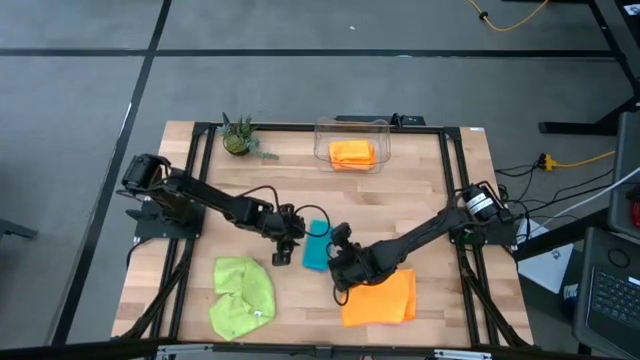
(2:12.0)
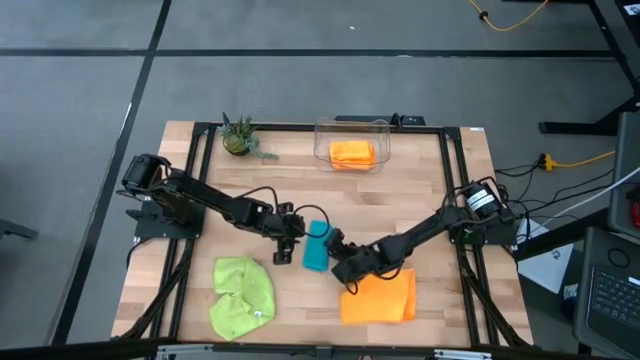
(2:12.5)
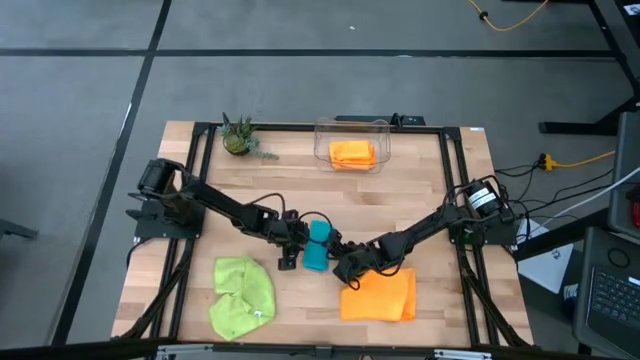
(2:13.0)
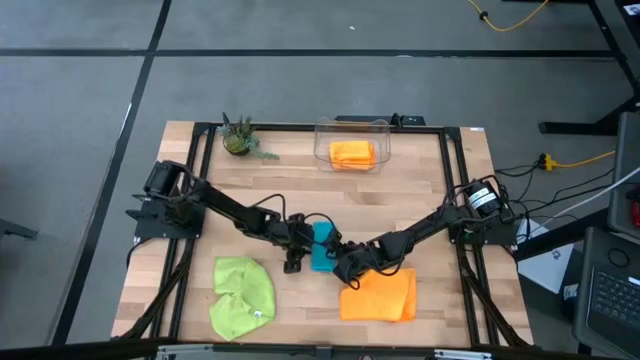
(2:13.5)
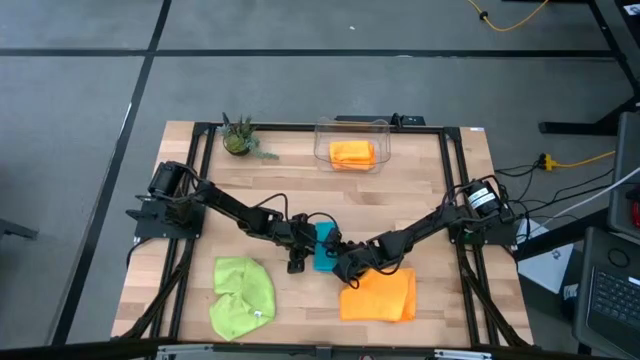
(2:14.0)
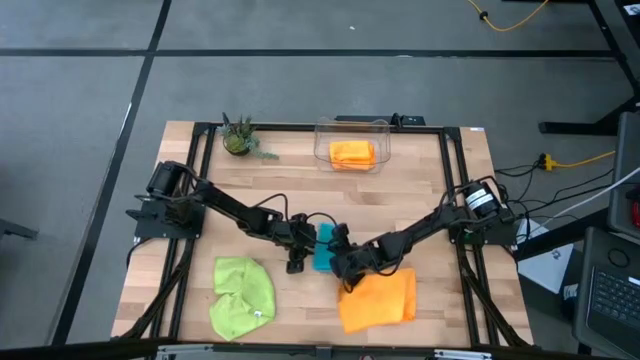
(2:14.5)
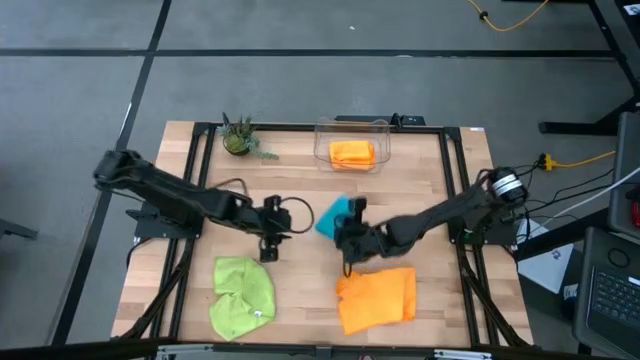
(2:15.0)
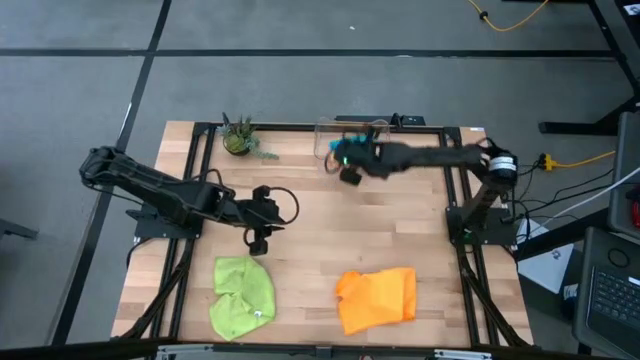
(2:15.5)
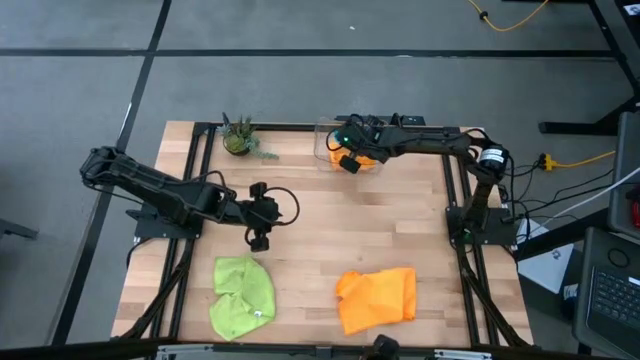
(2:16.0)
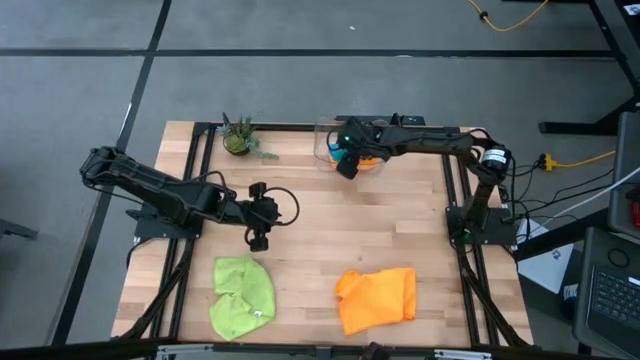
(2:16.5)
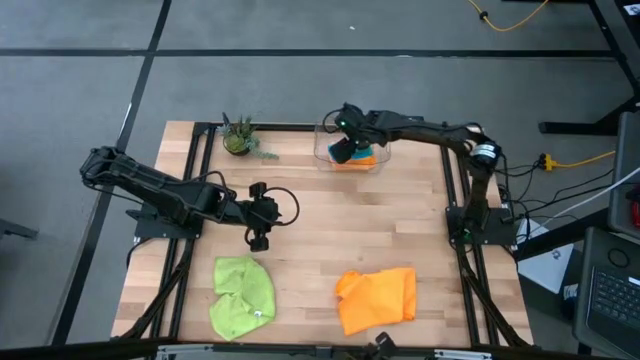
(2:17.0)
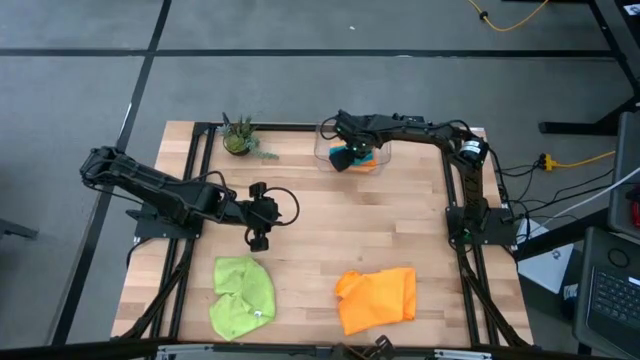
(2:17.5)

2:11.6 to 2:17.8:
Task: Fold microfiber towels
Put the blue towel into the transparent bin

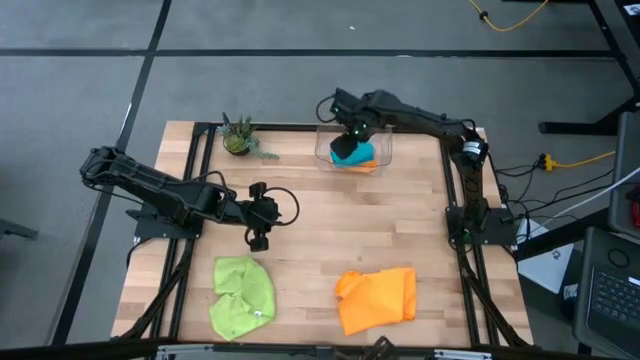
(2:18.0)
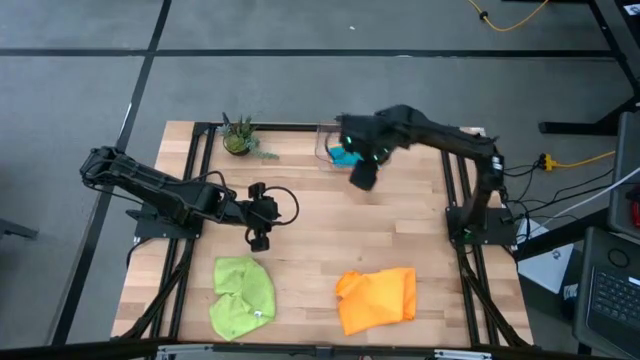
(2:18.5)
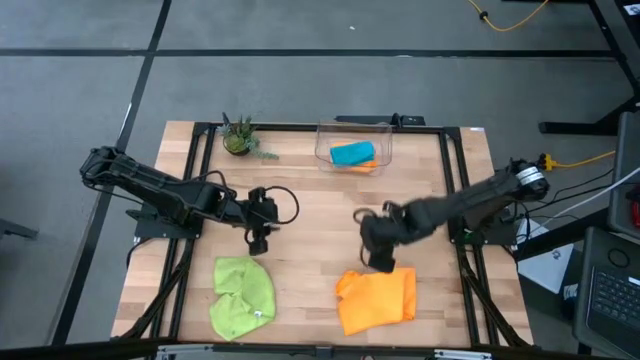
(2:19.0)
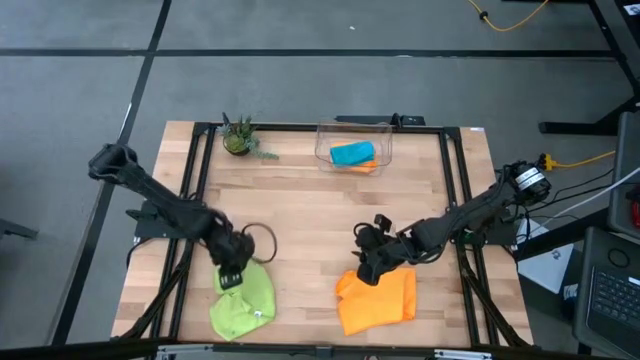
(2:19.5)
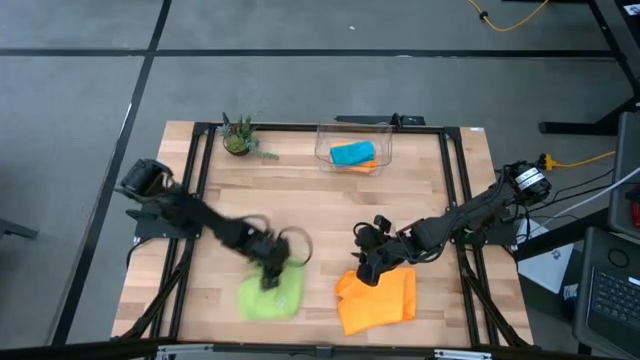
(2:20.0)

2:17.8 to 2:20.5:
Adjust the green towel on the table

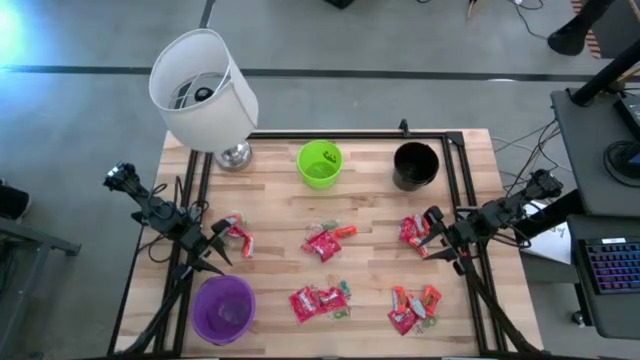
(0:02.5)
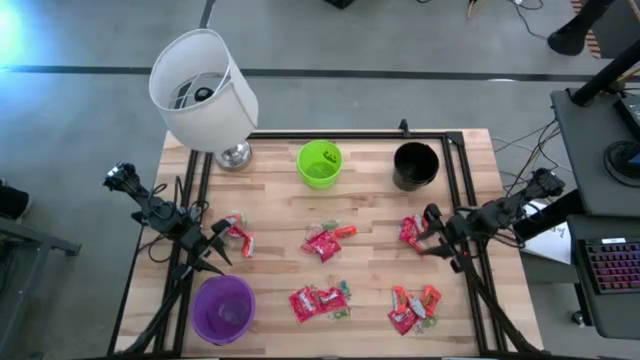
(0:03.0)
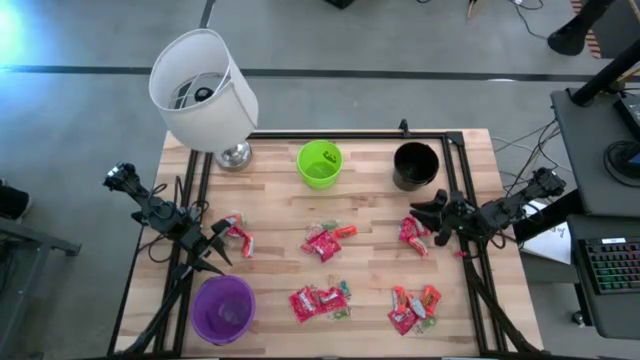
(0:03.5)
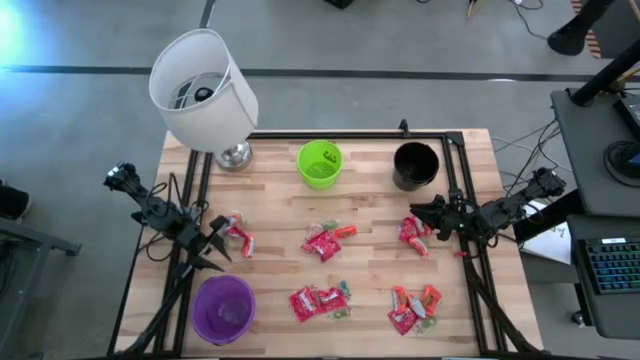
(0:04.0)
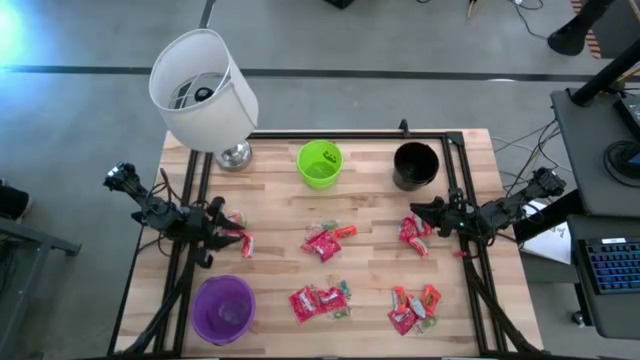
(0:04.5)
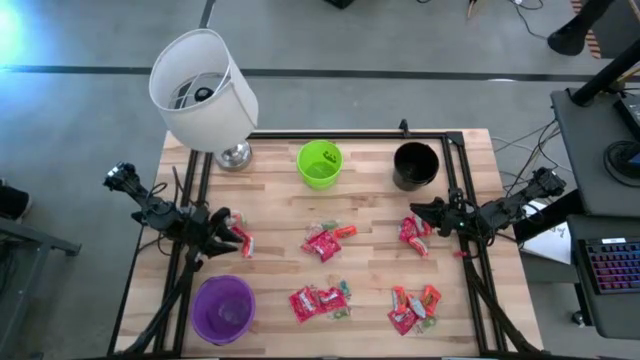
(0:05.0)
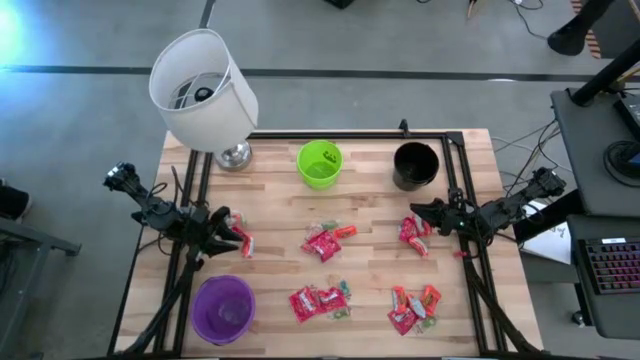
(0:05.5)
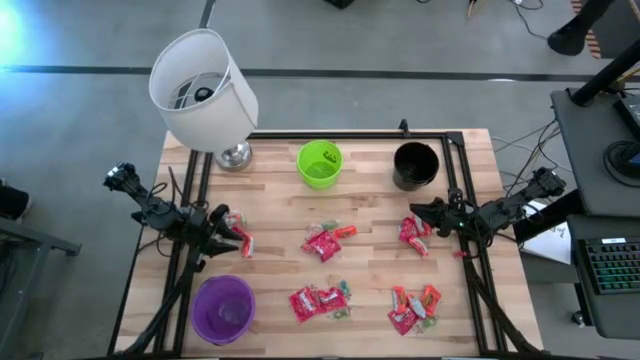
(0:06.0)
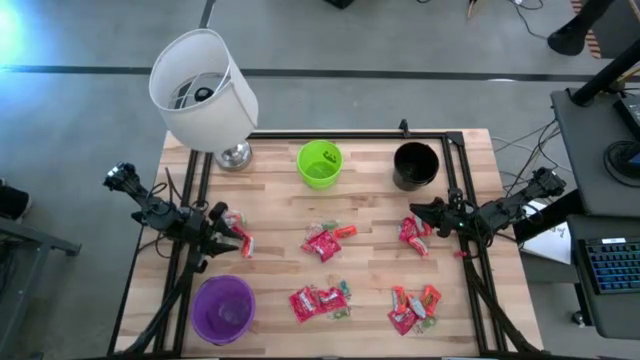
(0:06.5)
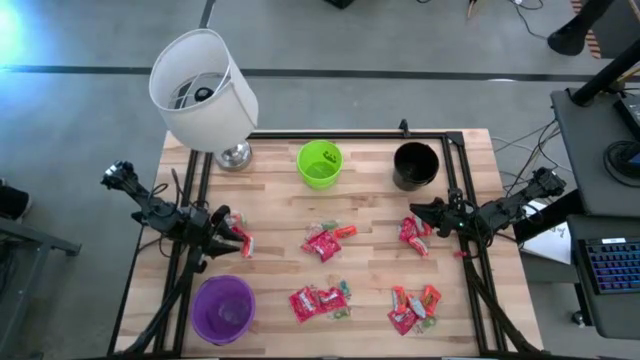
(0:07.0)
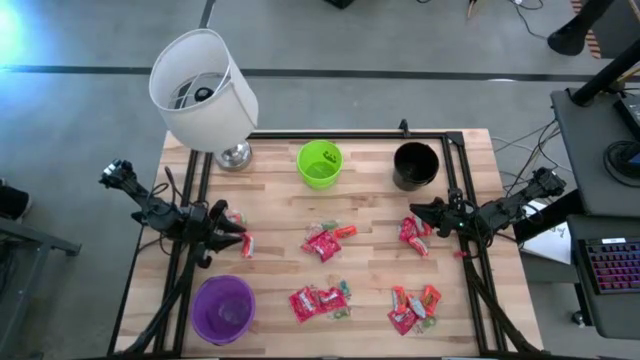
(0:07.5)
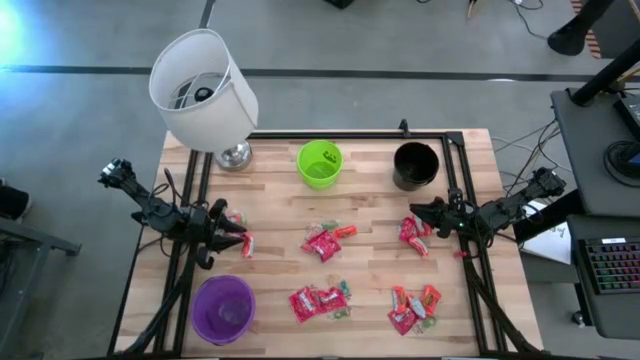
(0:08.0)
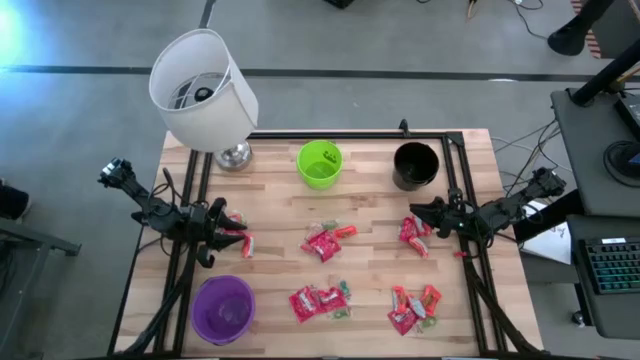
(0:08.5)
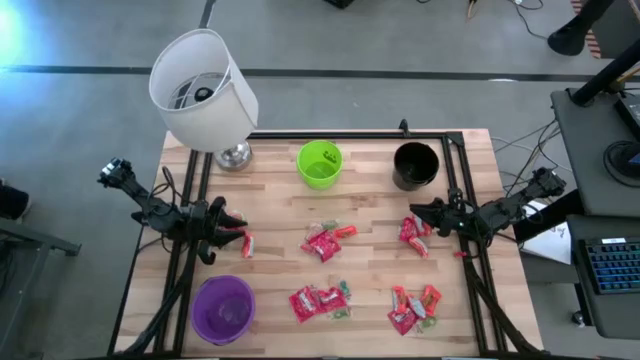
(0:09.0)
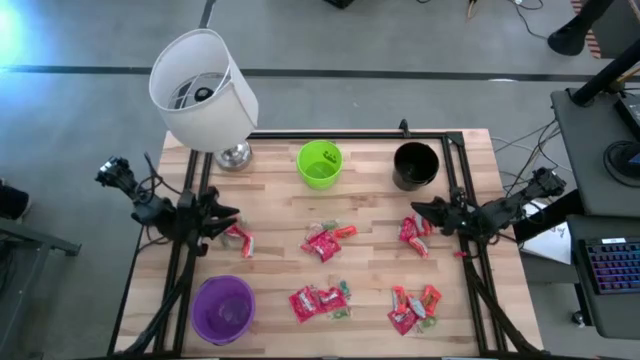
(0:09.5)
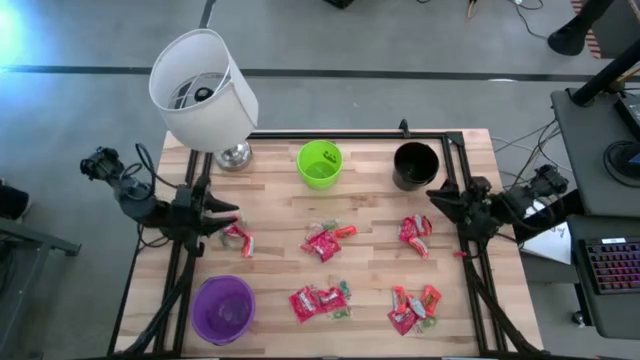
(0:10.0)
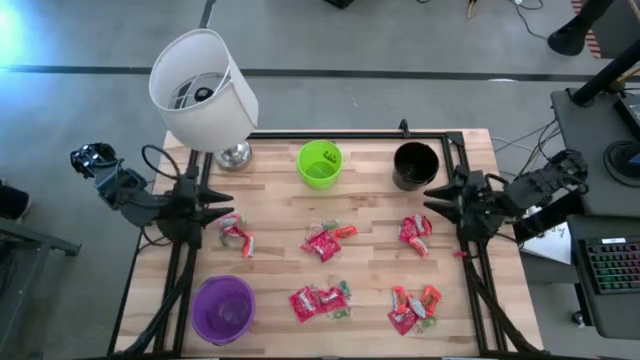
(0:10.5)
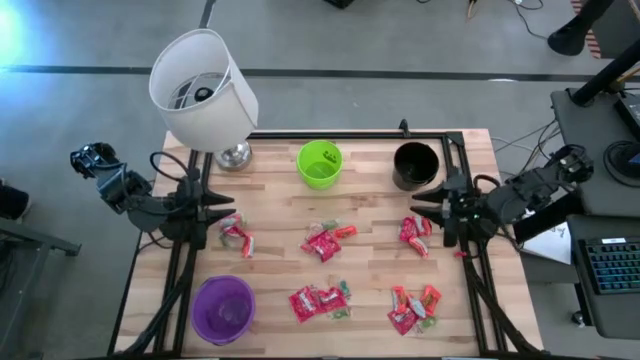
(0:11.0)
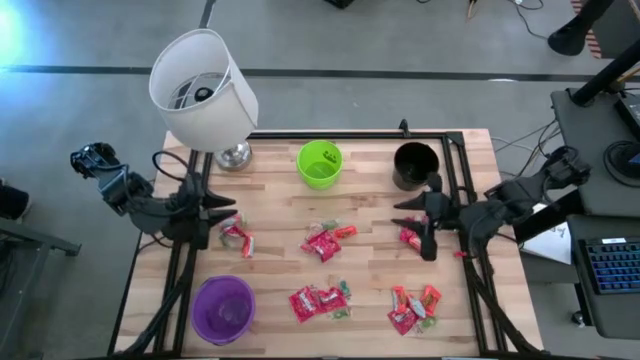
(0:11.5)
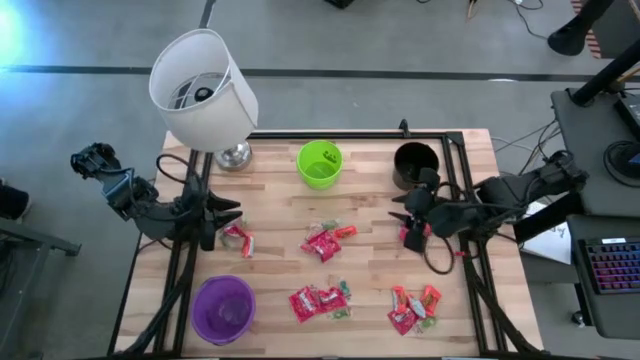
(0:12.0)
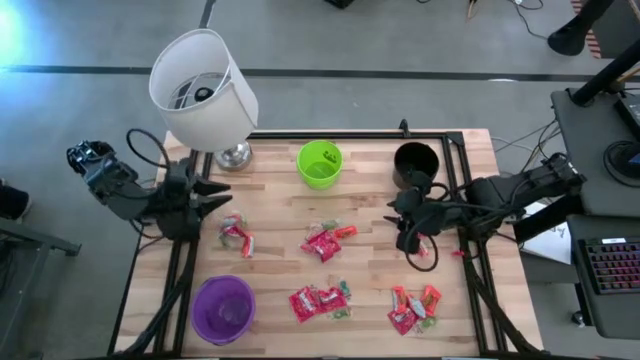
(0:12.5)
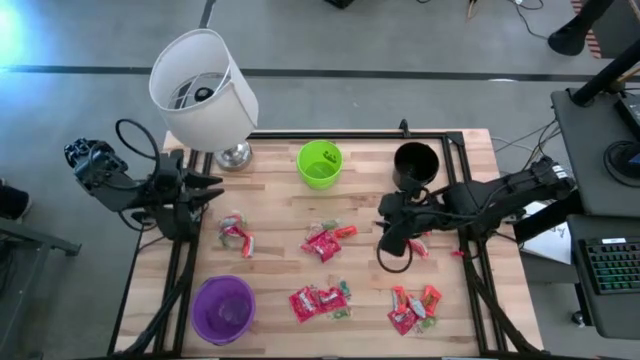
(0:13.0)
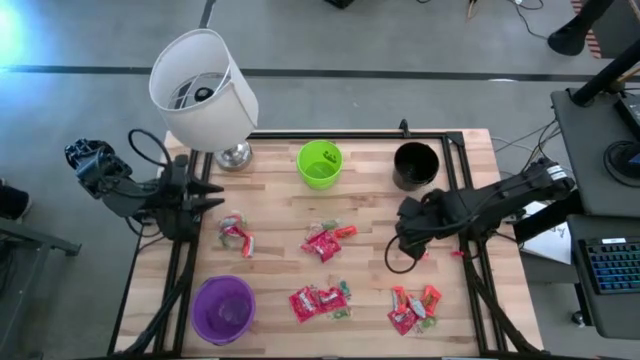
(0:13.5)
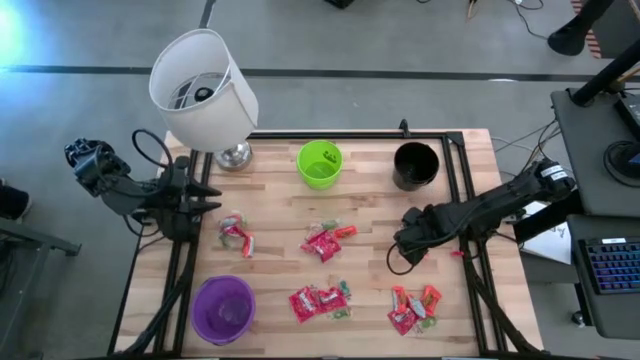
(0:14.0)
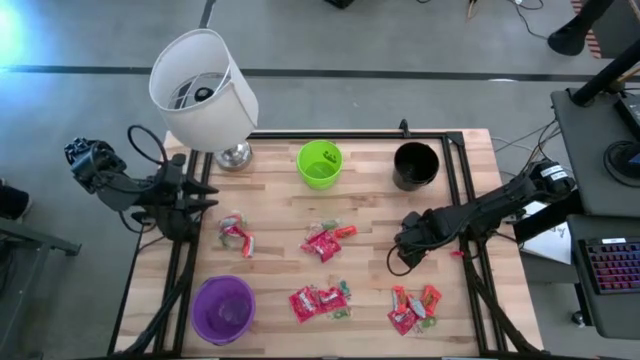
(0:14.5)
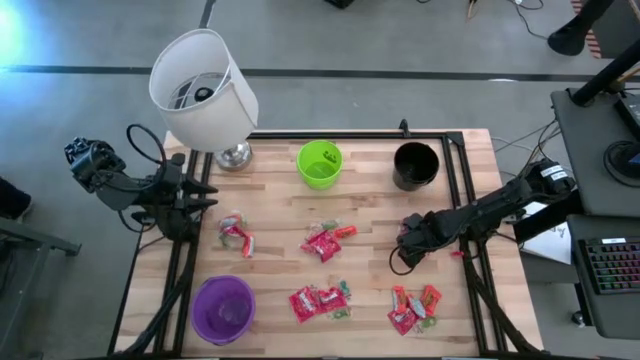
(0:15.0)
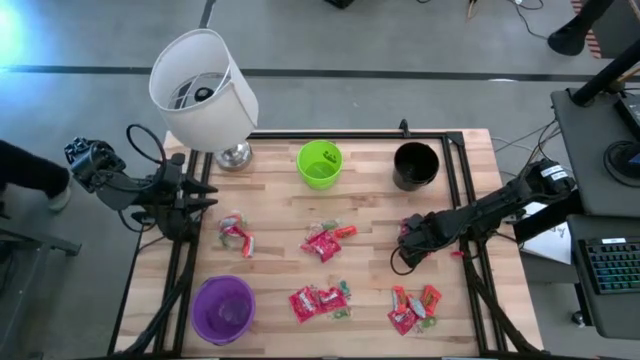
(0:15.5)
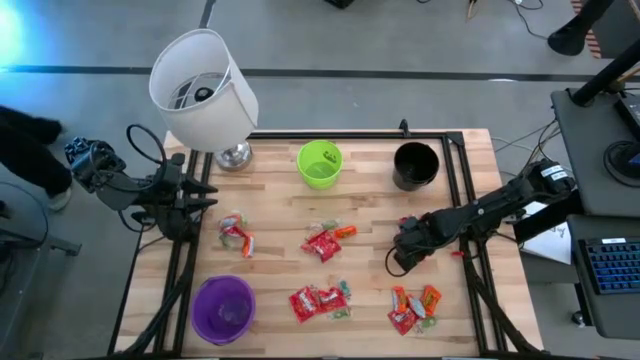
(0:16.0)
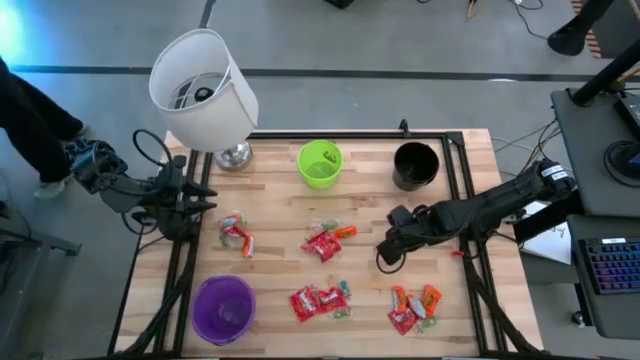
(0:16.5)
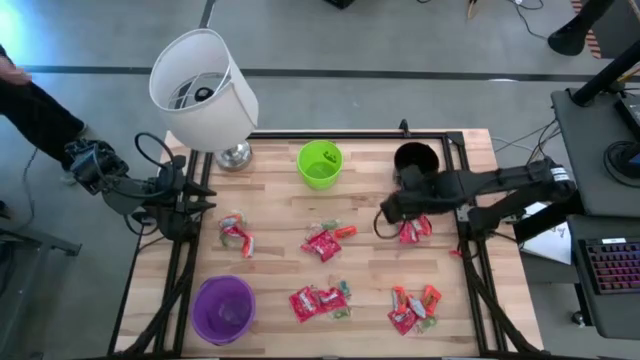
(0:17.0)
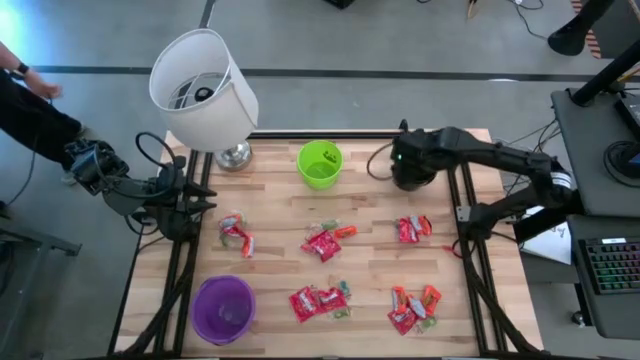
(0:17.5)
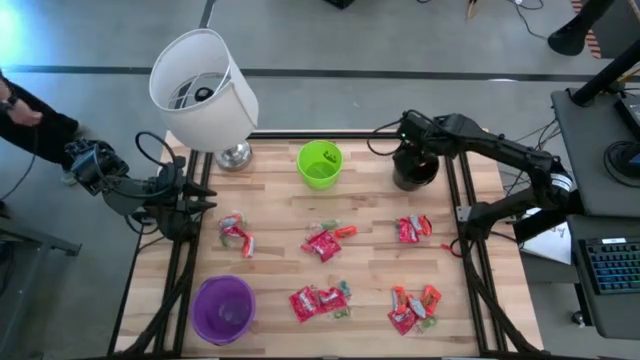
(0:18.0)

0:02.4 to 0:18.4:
Task: Sort candy
Put the orange candy into the black bucket
